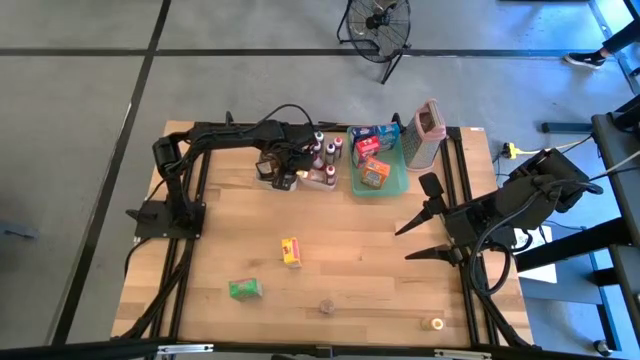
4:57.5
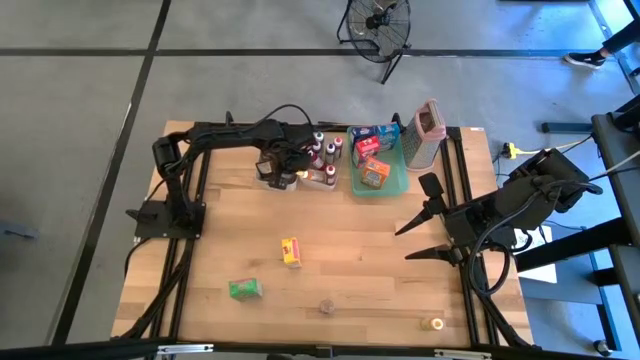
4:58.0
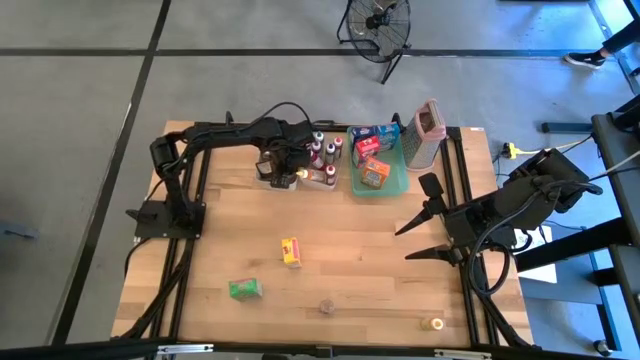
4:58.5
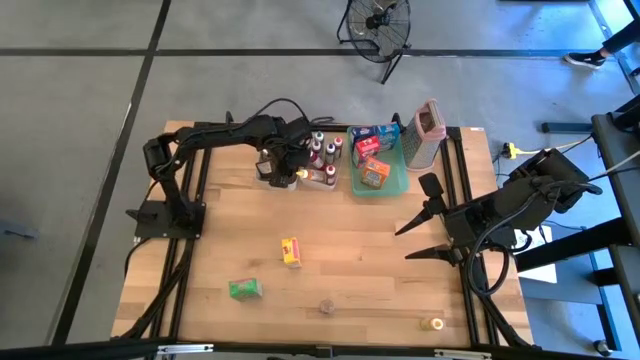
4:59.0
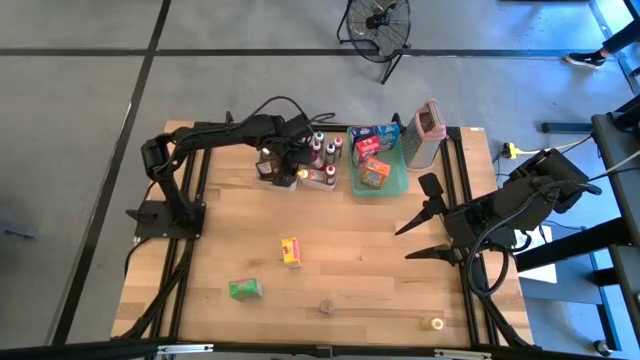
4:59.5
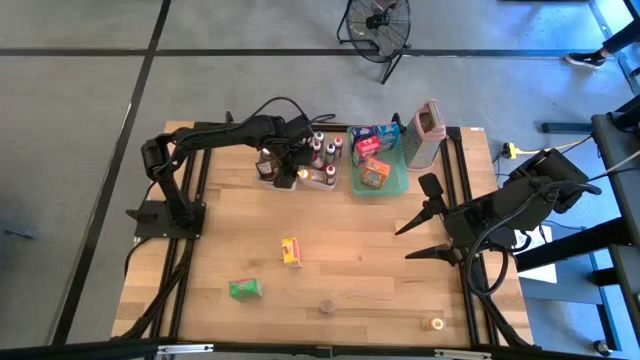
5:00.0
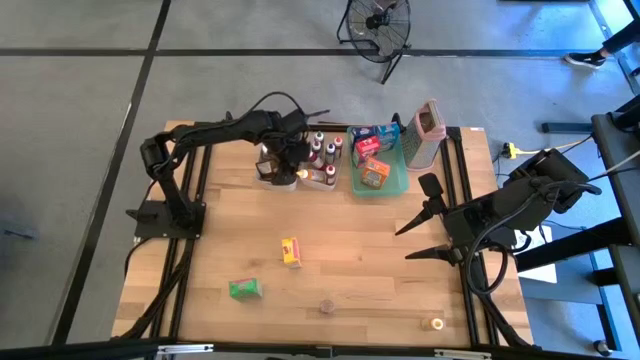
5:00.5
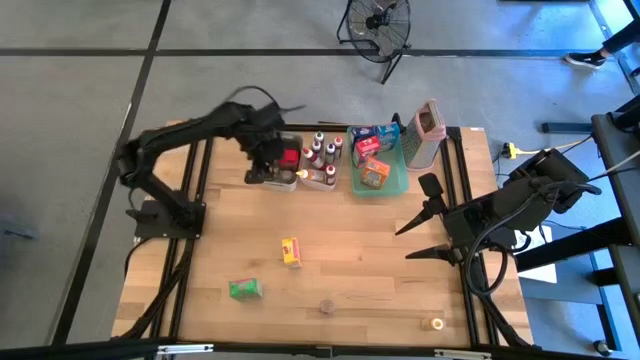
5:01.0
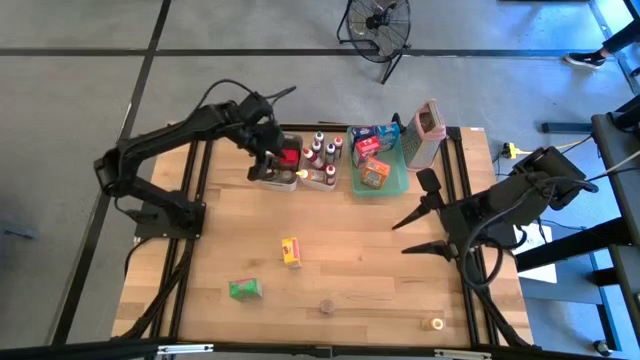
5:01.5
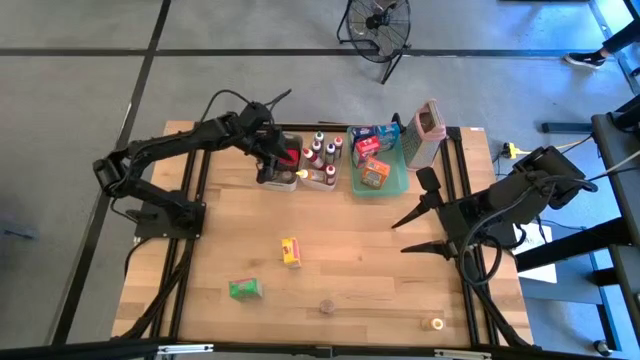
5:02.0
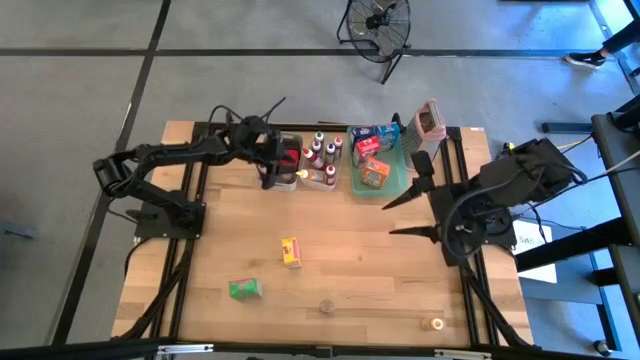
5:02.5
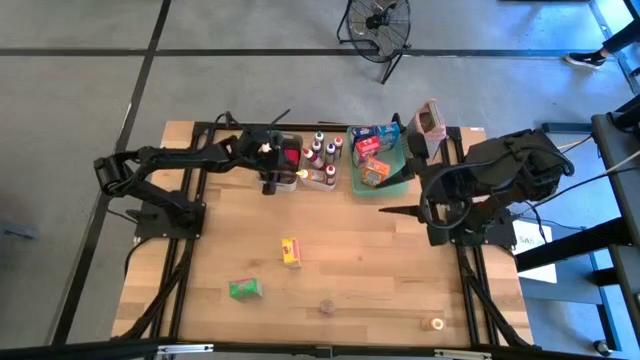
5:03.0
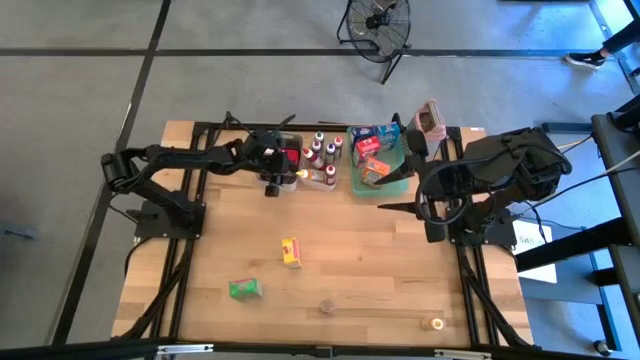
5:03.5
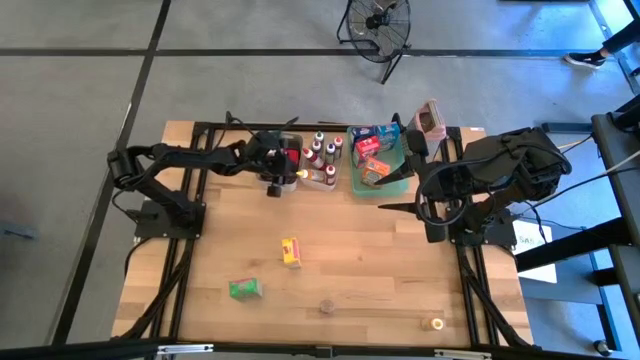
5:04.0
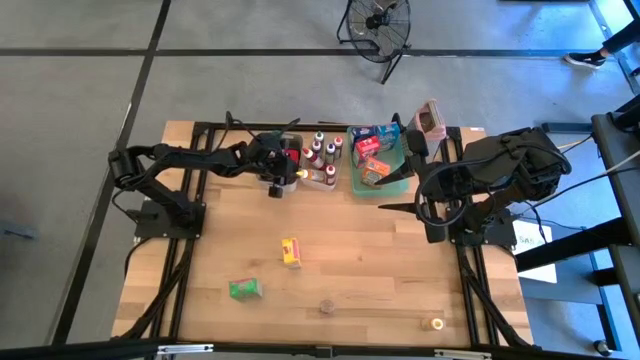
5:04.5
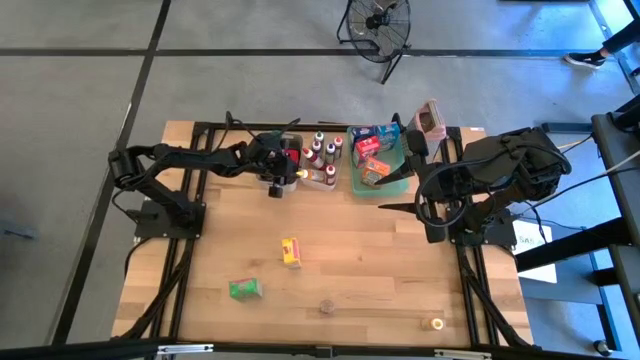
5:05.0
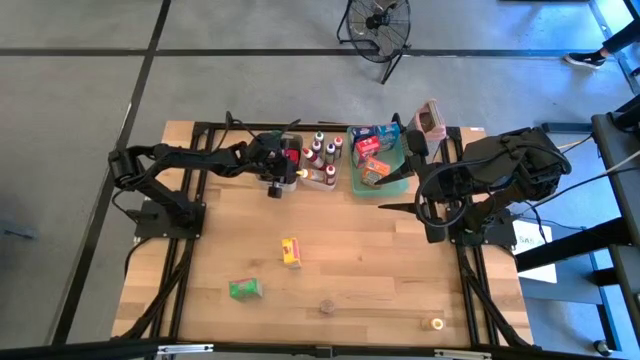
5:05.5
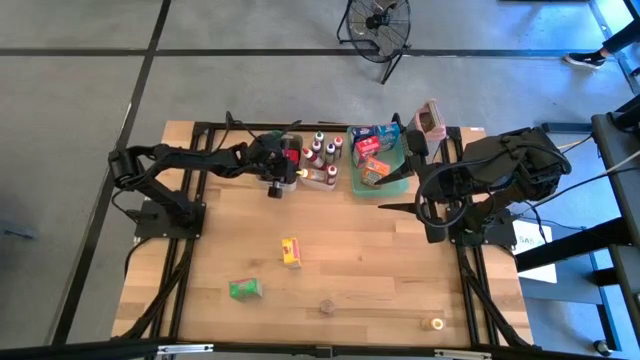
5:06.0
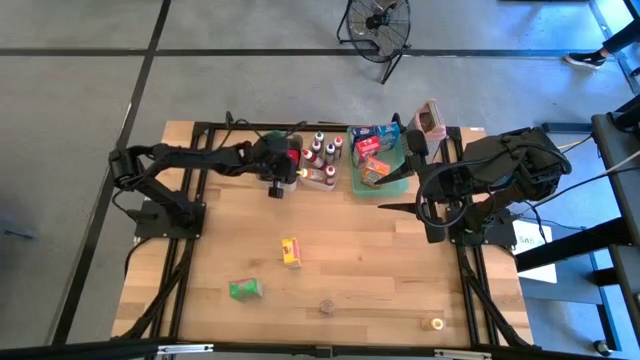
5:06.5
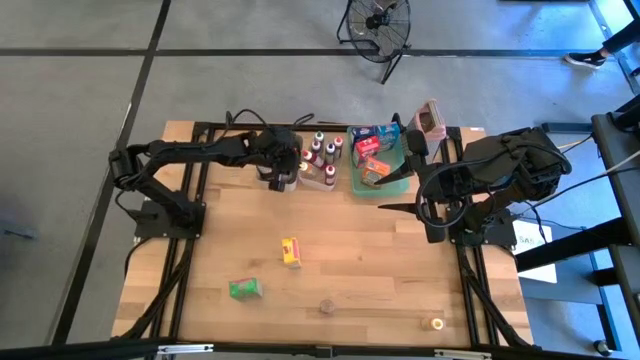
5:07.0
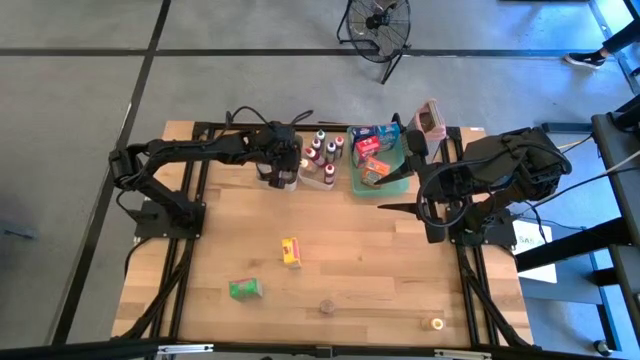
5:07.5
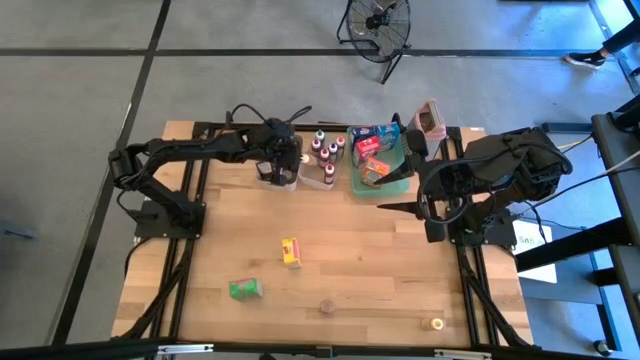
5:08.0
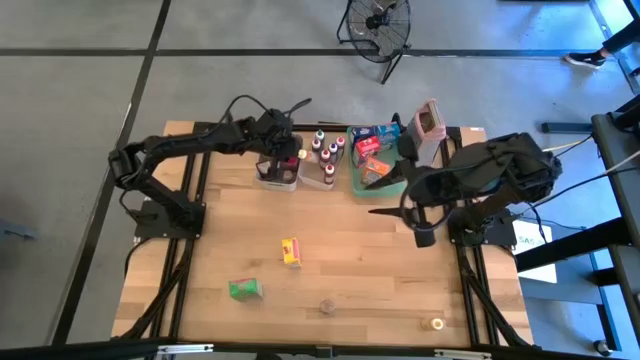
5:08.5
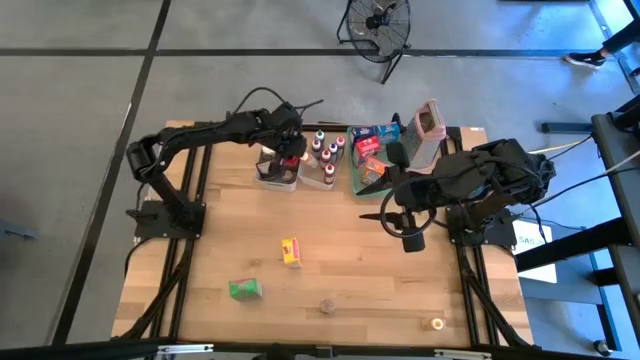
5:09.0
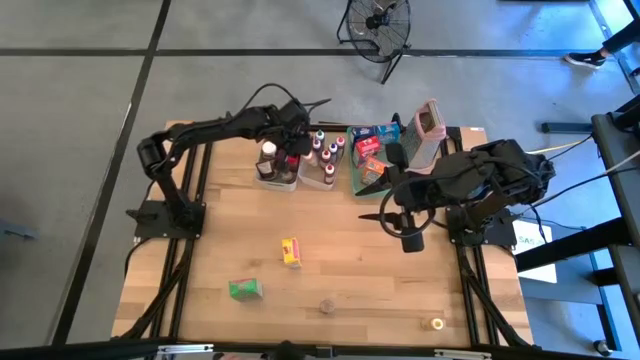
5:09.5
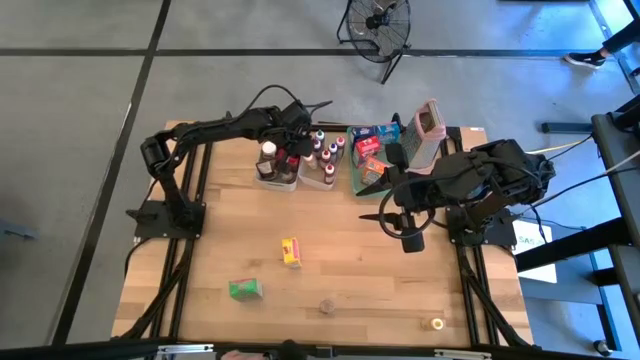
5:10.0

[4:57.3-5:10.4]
Task: Pick & Place Kitchen Items
Adjust the yellow food coloring bottle in the transparent bin

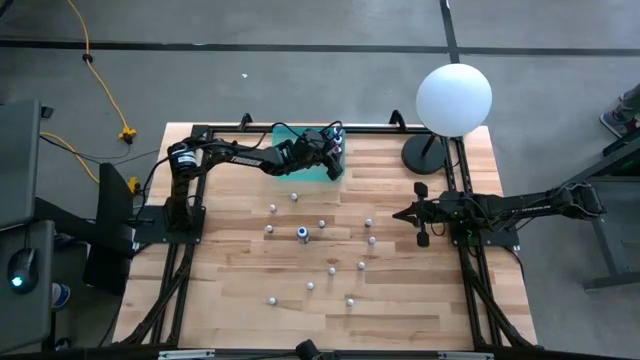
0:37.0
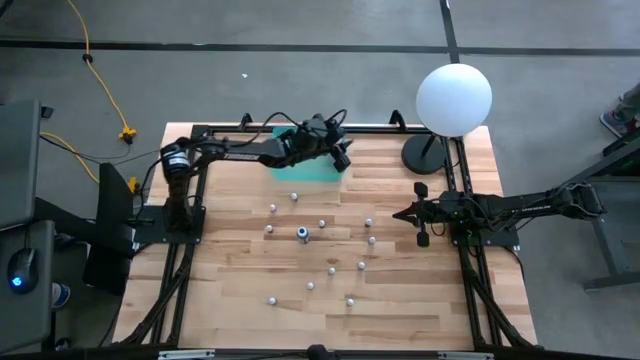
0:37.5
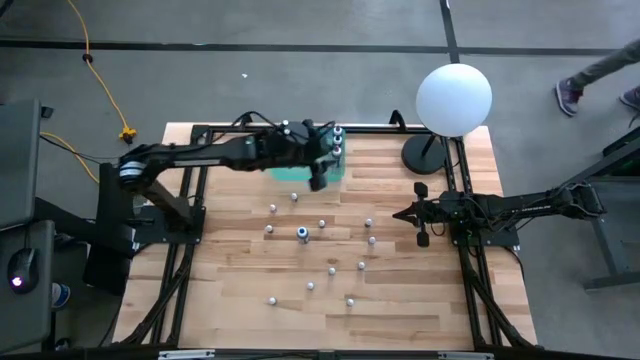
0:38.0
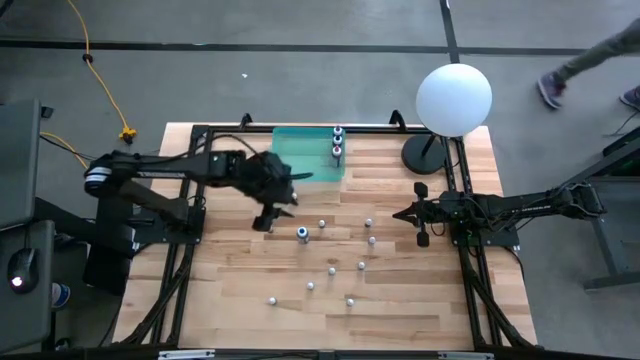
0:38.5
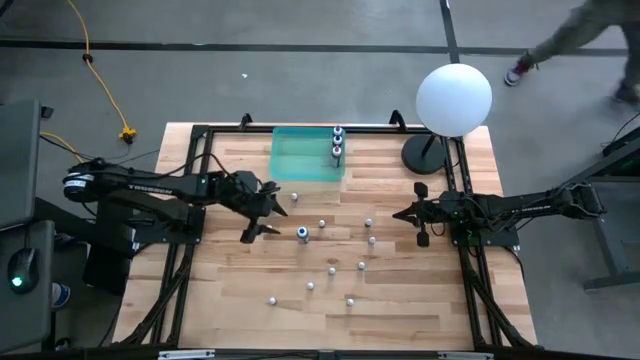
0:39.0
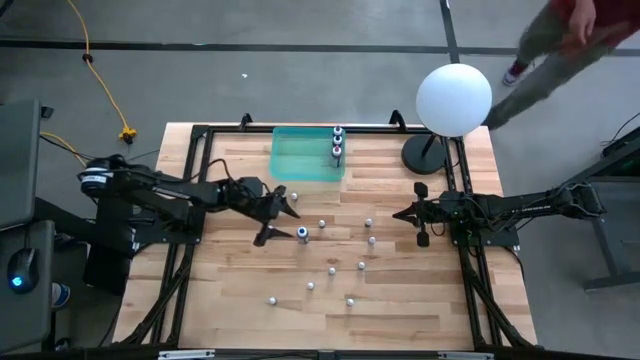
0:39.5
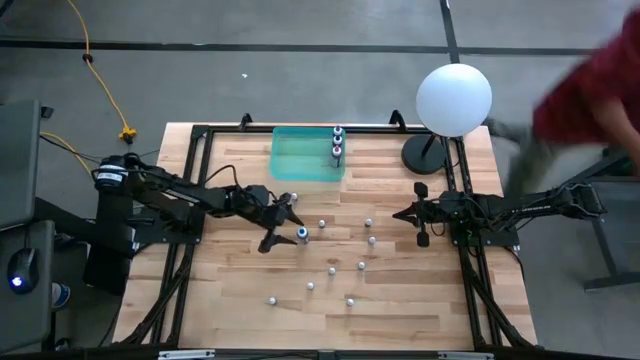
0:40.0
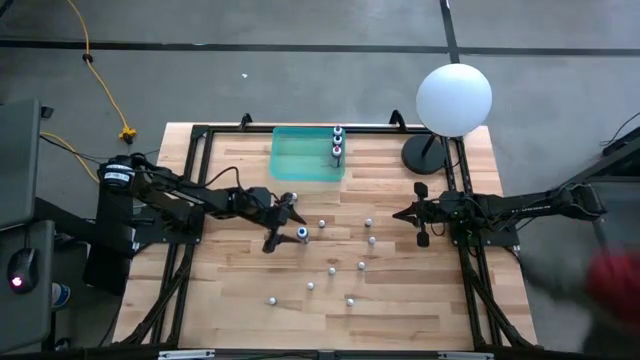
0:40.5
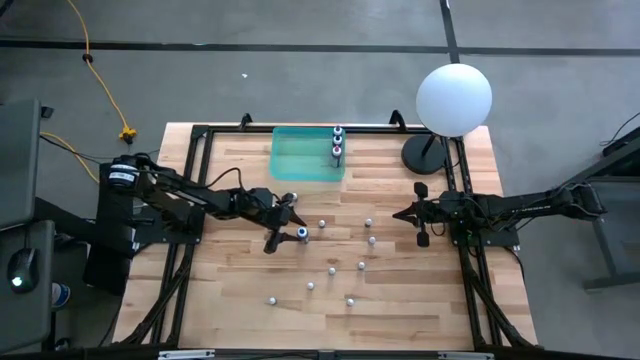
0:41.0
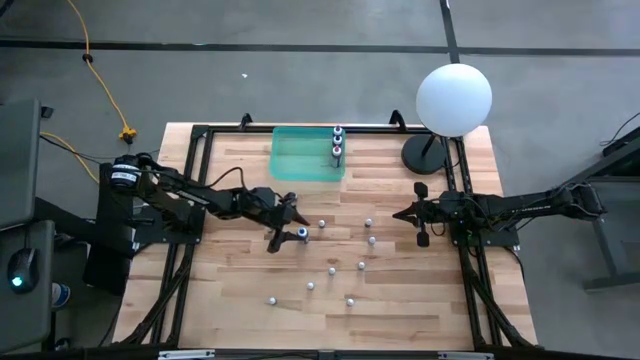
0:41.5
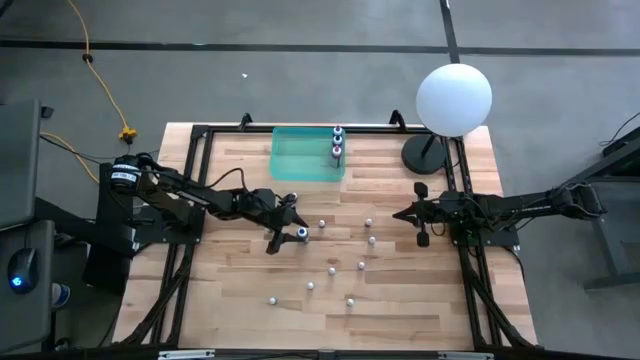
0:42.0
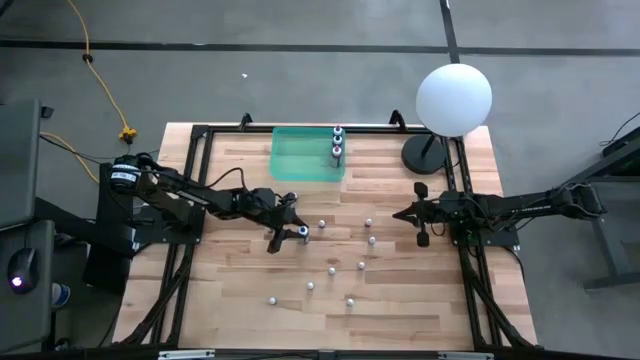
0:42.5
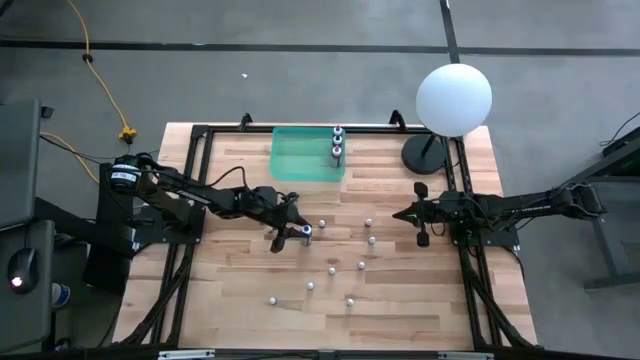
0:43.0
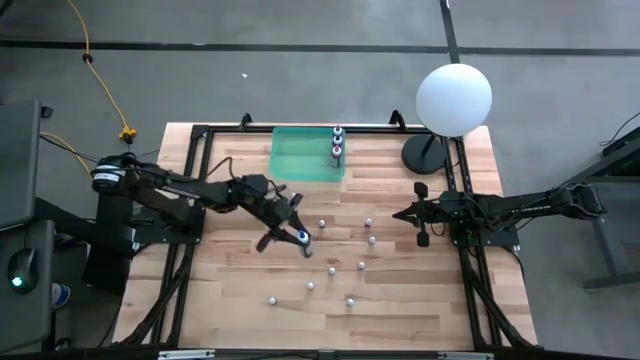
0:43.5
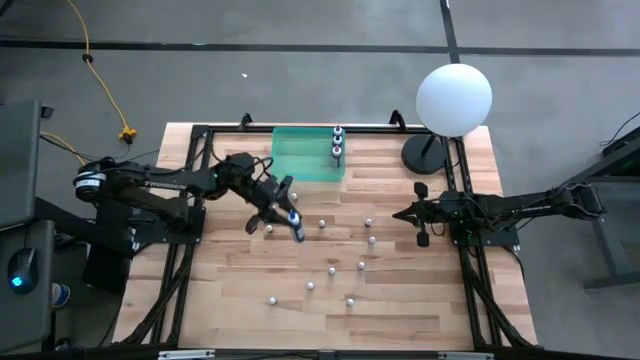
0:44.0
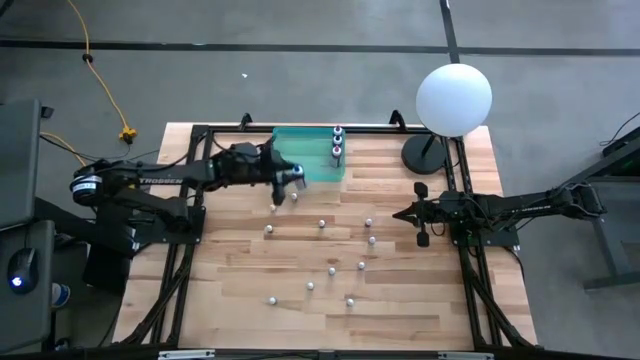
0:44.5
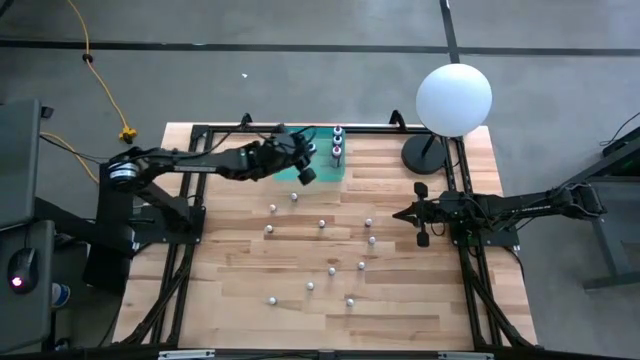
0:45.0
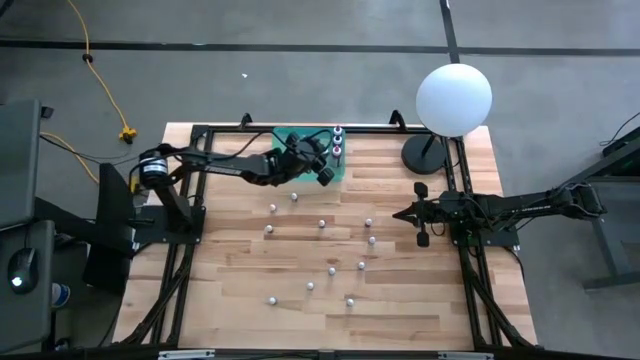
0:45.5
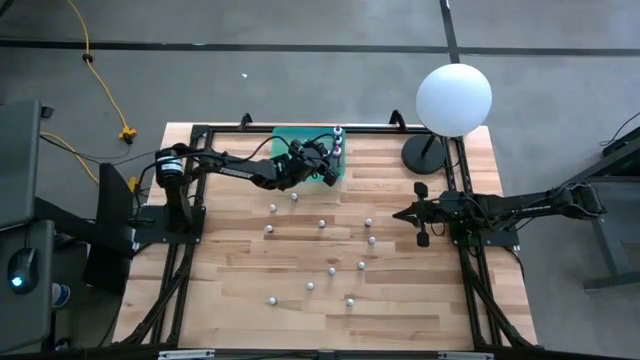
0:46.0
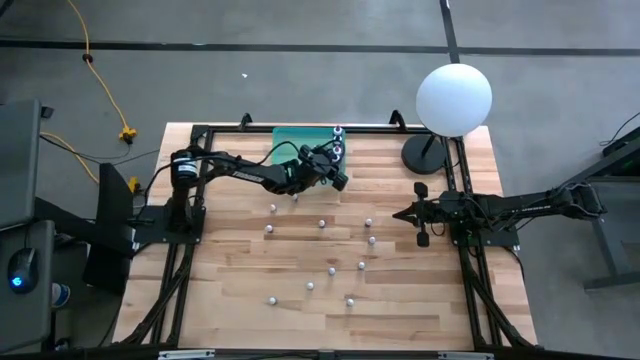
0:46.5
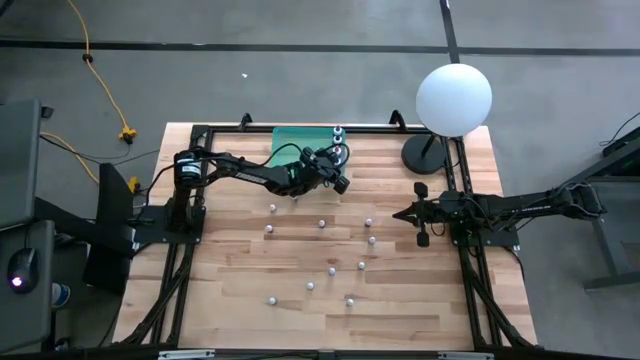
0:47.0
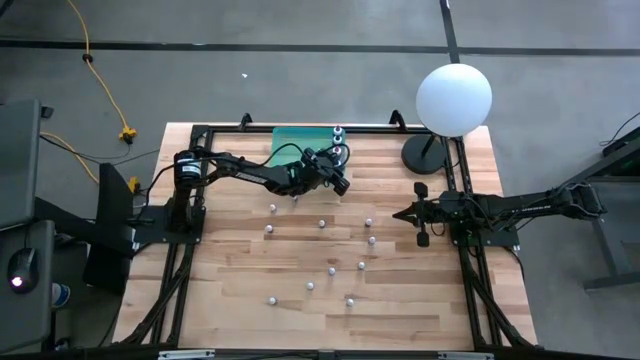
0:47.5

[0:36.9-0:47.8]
Task: Pick & Place food coloring
Put the big blue food coloring bottle into the blue transparent bin
